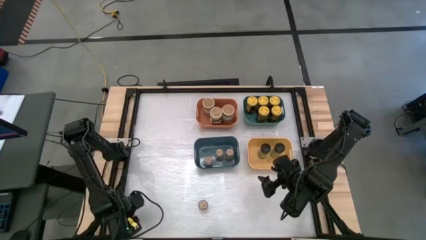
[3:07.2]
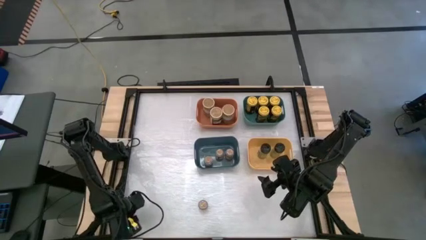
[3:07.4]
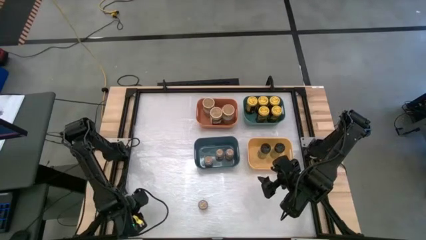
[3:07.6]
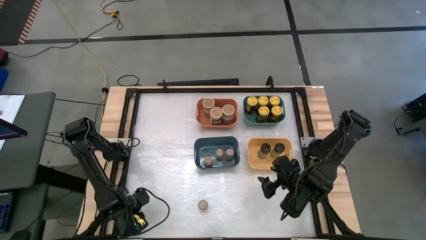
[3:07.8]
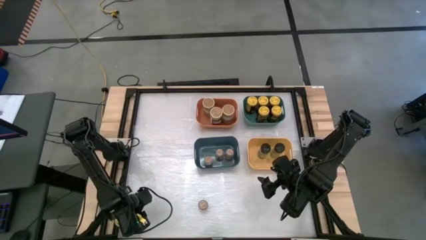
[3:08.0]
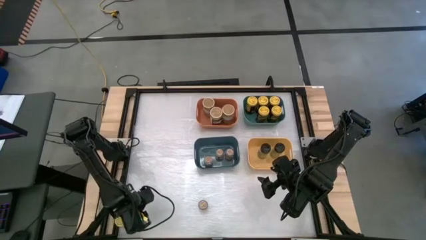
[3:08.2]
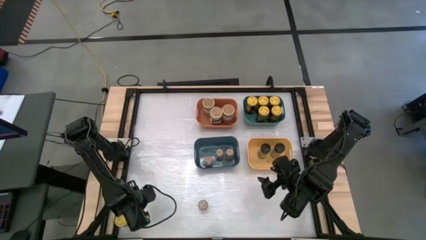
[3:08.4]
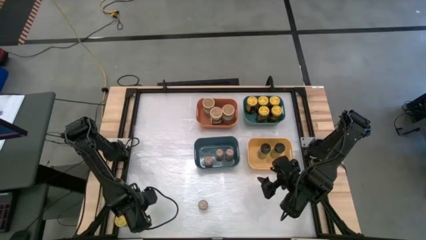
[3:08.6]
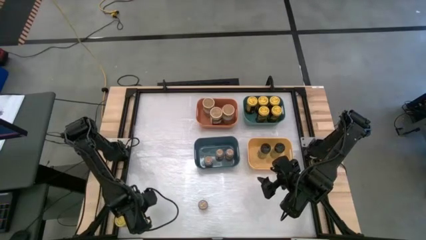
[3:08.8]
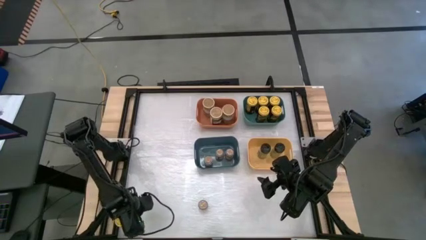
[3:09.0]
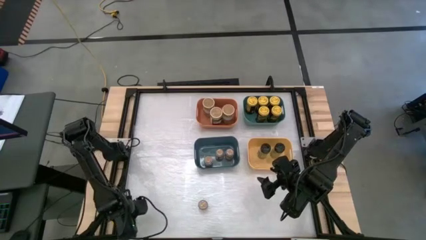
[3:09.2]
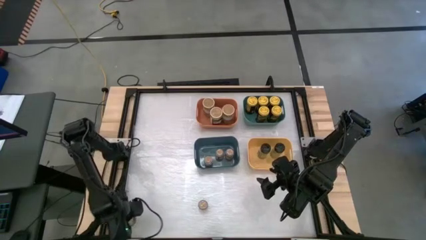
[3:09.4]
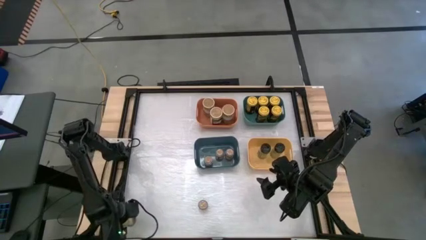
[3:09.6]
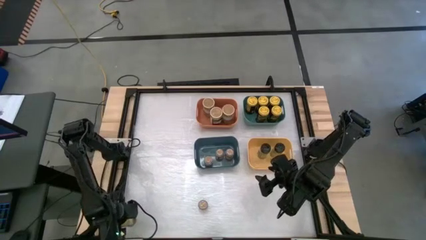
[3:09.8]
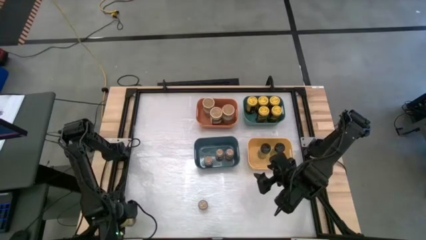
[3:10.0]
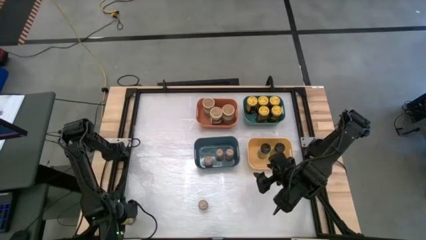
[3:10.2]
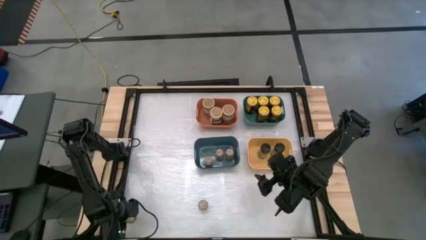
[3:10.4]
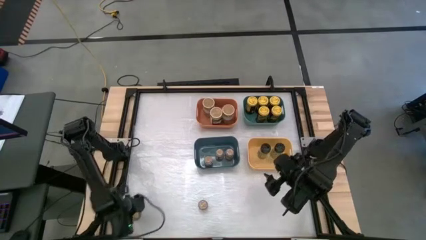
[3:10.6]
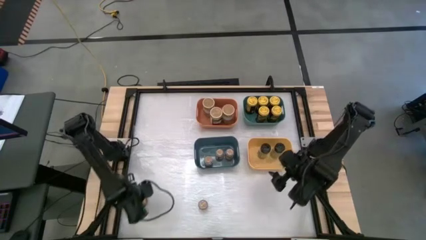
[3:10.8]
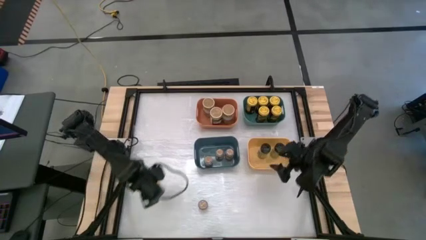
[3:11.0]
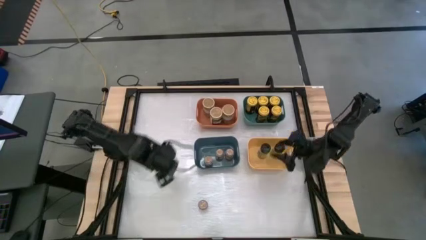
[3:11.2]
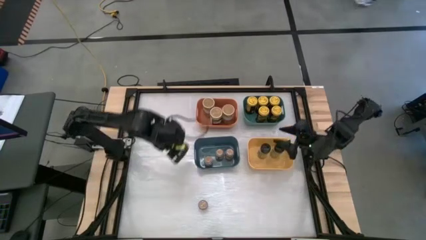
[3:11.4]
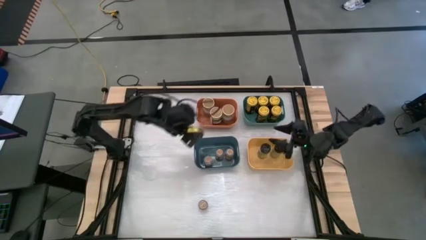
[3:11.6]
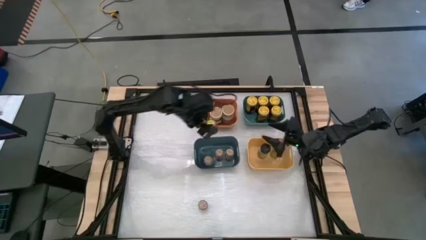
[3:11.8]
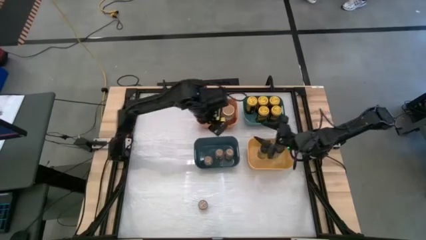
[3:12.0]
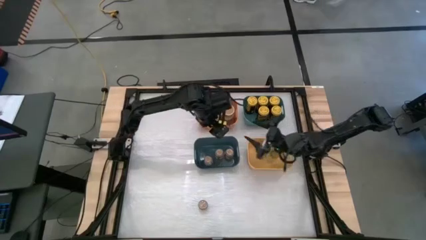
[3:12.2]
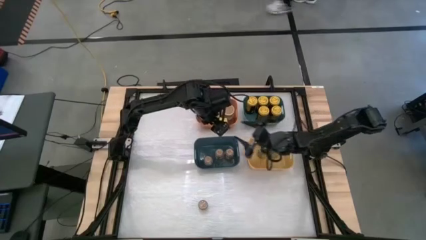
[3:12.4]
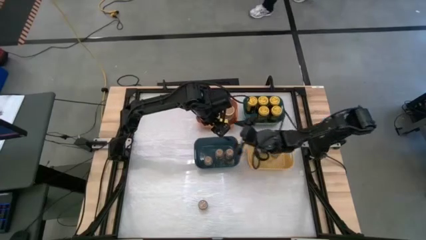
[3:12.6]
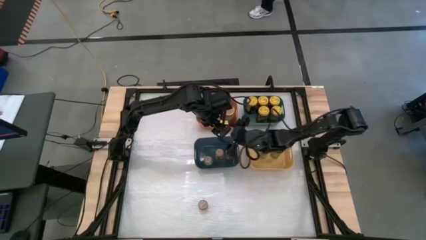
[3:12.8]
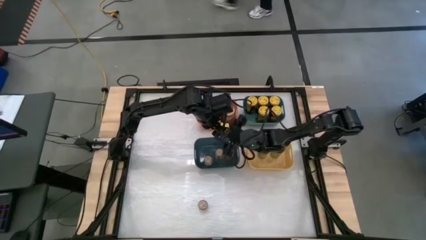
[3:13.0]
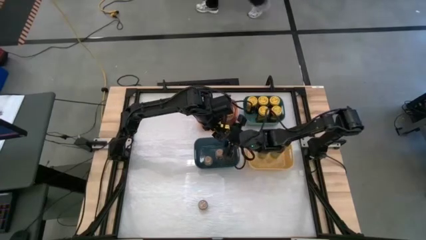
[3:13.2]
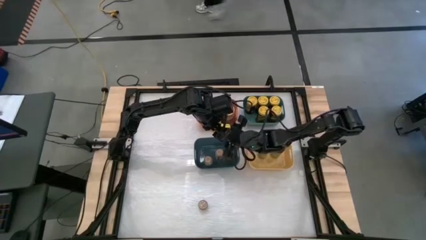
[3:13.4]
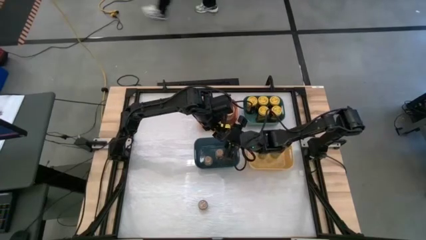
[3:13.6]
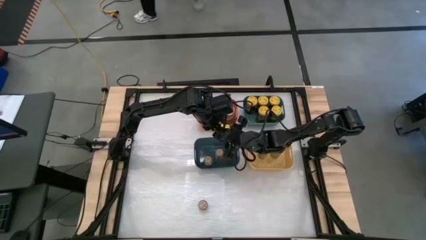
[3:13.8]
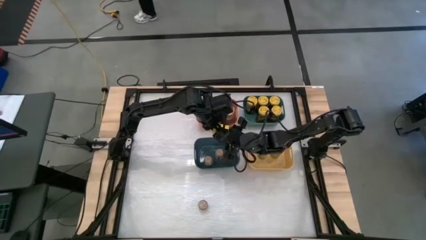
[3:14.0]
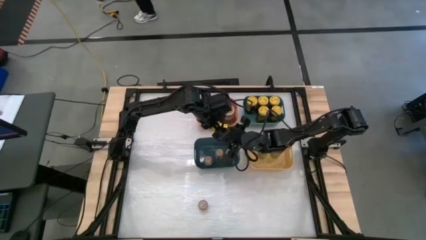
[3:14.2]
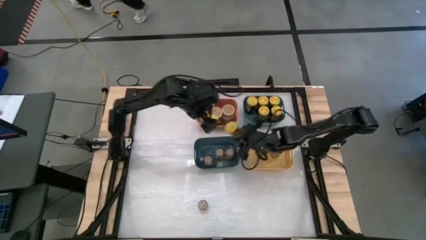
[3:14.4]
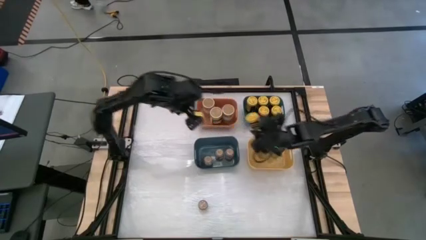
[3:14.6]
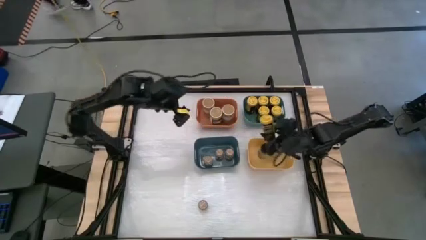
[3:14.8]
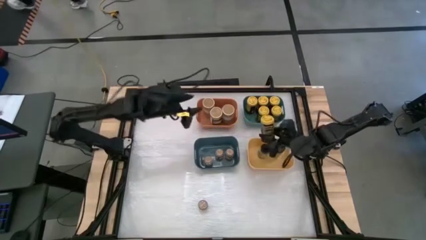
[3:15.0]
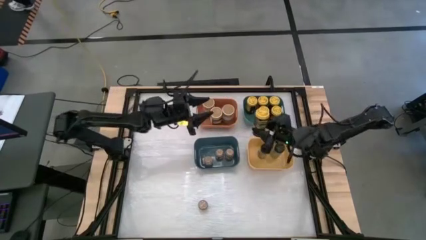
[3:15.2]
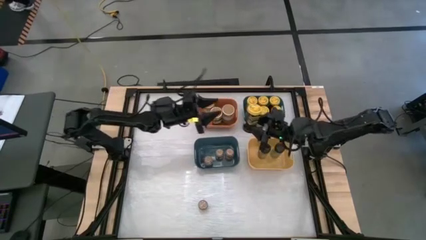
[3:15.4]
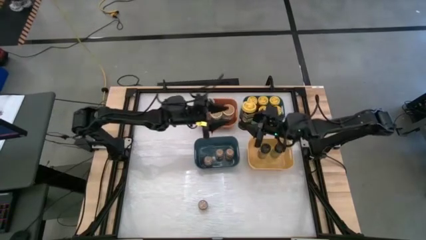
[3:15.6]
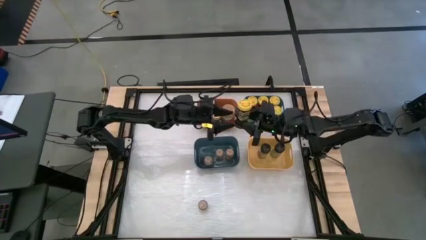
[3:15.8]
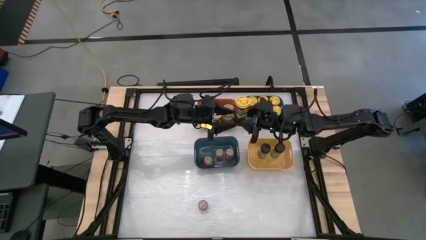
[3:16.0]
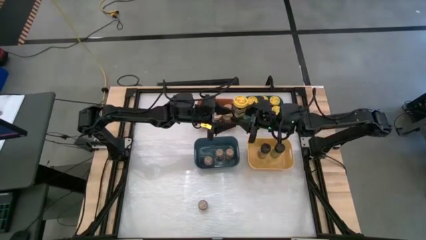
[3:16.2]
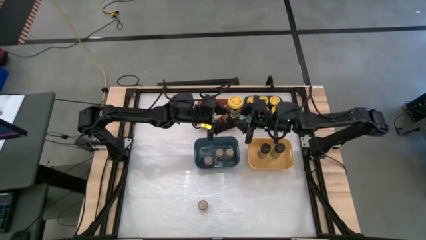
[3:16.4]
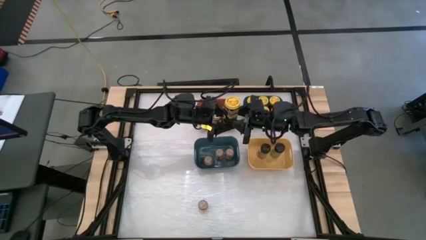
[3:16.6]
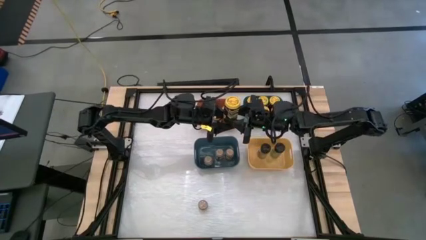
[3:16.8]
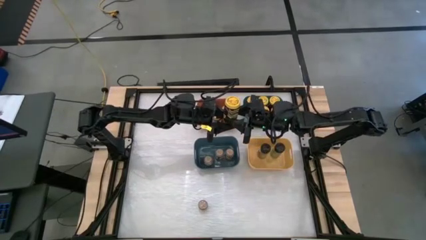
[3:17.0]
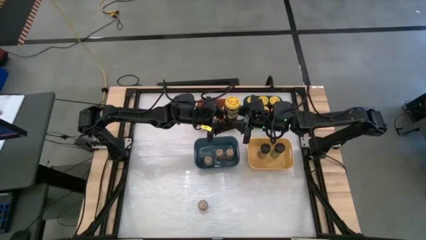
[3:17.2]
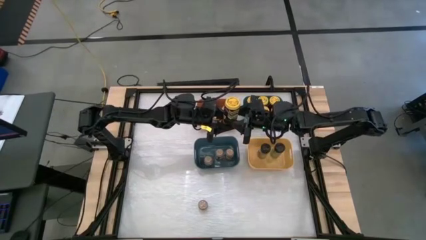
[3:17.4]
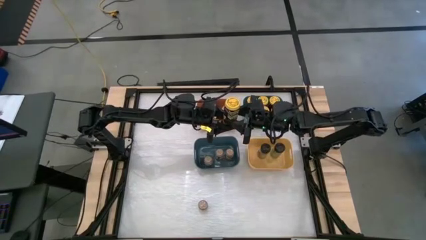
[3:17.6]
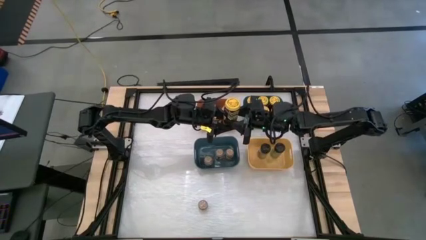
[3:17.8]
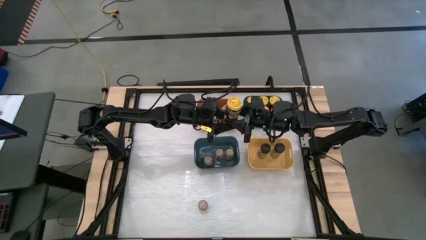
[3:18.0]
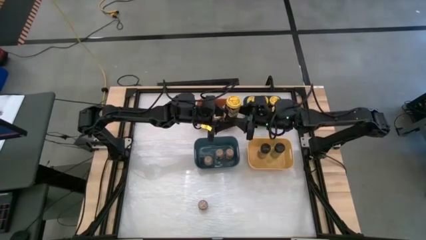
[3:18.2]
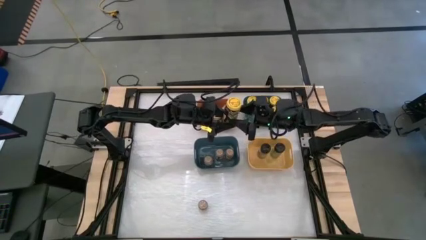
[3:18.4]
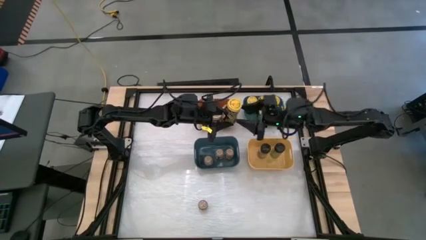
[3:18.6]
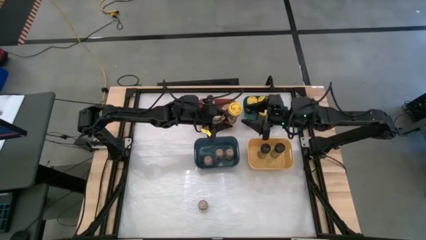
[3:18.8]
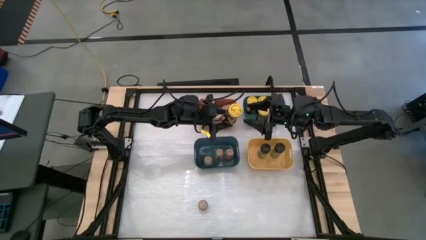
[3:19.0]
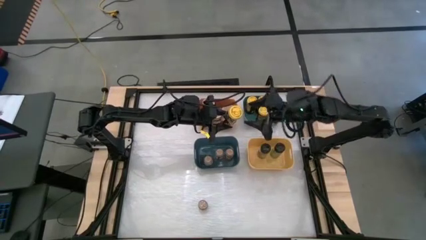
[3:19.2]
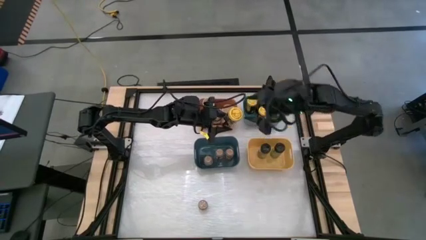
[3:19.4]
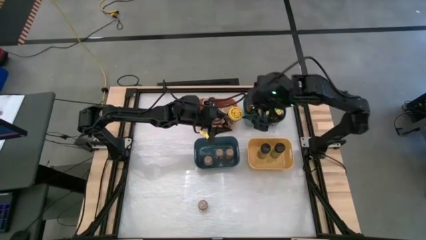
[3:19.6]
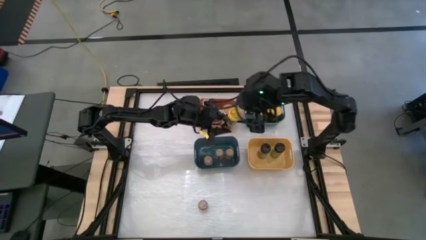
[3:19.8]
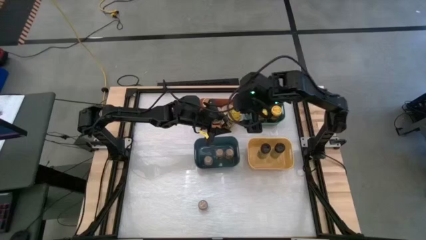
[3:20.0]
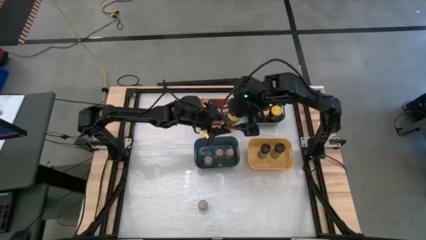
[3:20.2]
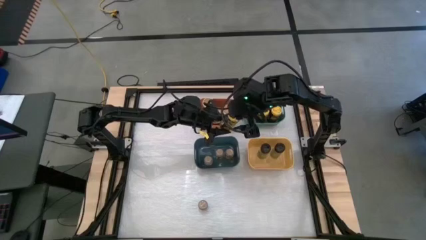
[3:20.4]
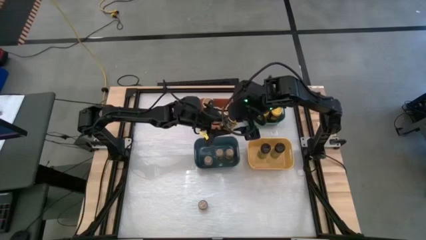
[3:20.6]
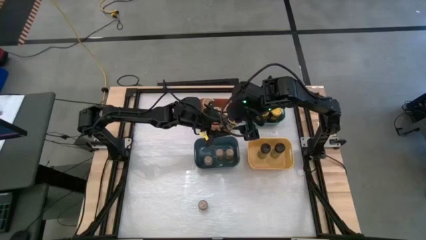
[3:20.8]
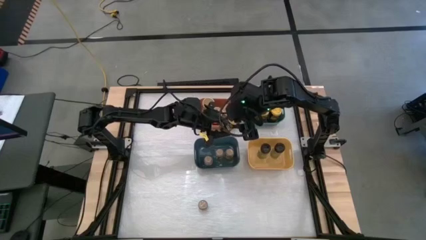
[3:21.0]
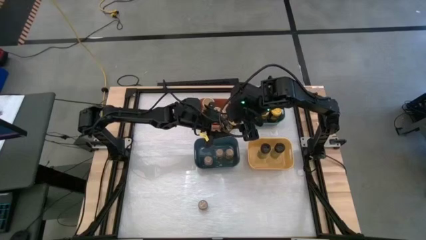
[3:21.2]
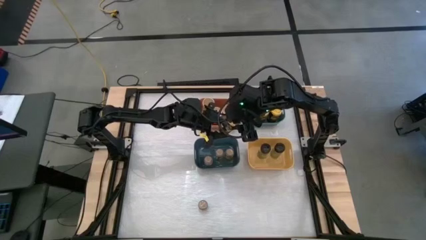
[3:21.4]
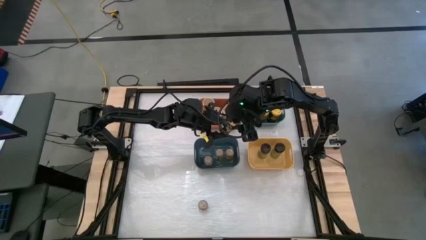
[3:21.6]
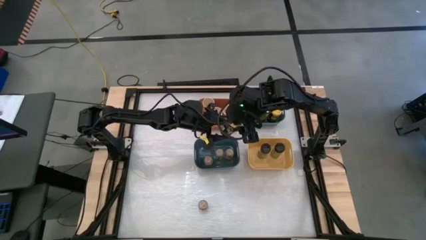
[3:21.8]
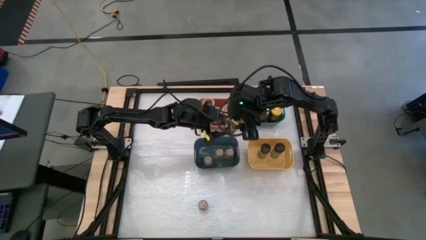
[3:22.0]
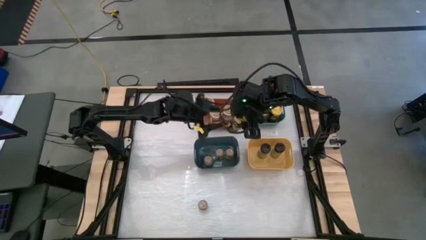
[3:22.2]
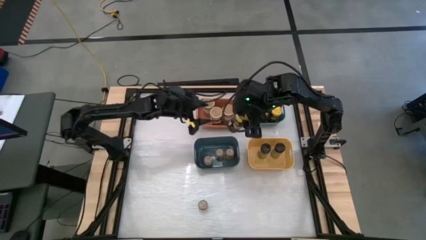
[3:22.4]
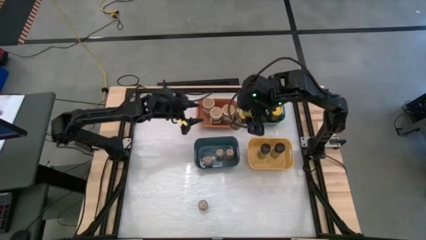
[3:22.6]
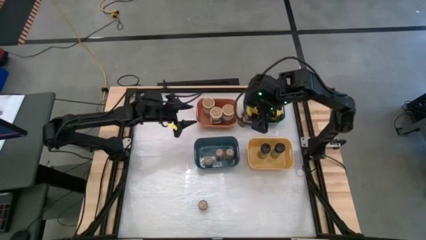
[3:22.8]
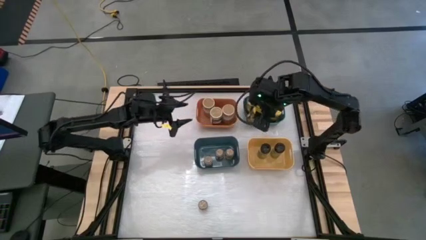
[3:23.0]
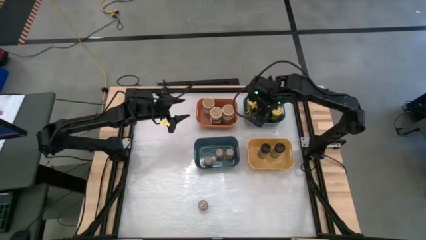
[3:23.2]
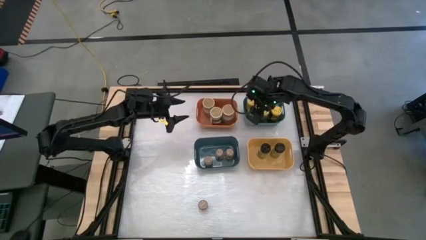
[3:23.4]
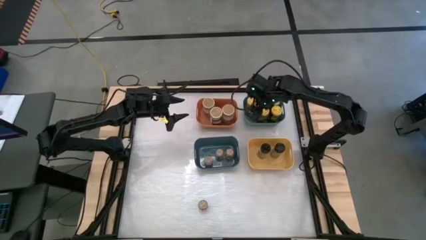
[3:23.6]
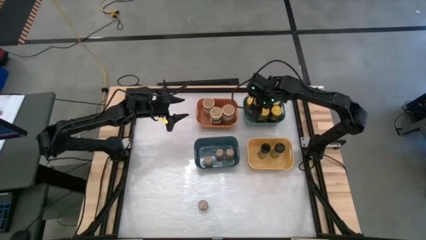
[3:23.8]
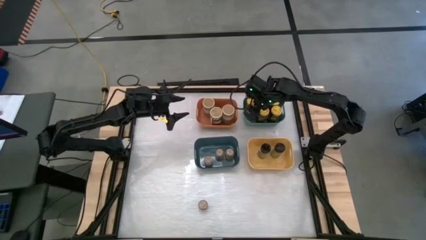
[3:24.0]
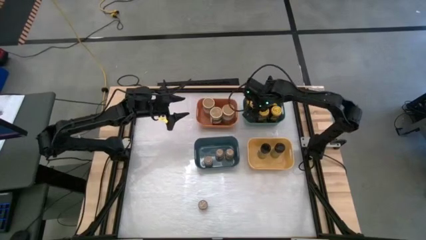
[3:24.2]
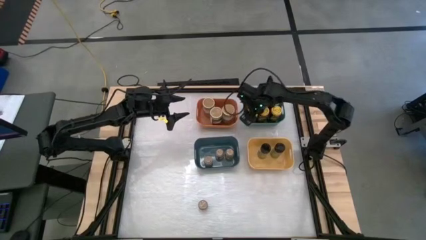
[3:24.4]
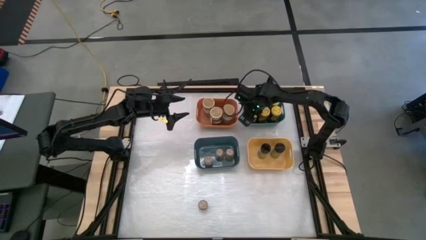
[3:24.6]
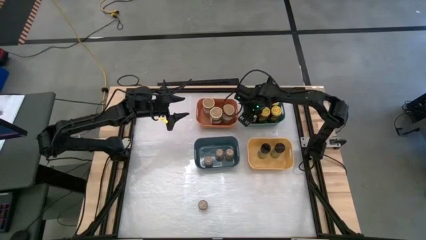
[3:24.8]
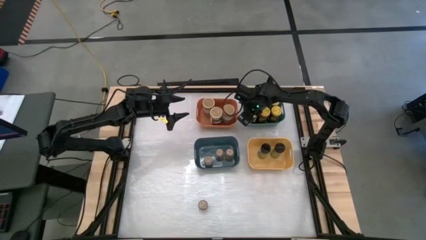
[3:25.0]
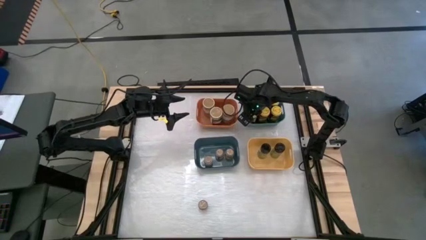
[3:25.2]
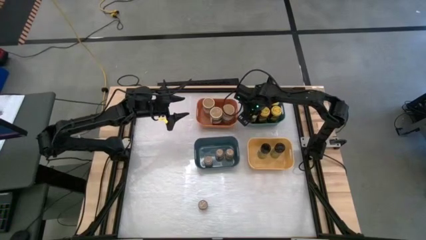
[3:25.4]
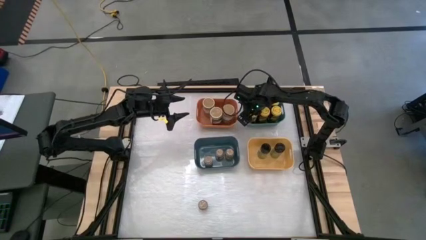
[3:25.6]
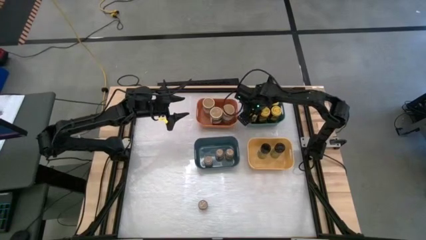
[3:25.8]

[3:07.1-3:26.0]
Task: Sort spices by type
Put the yellow spice bottle into the green bin
